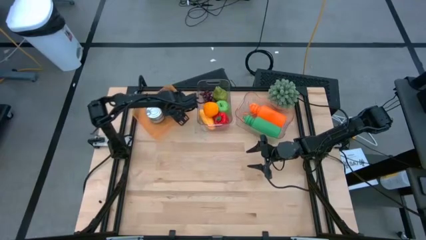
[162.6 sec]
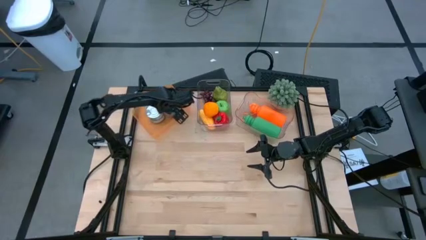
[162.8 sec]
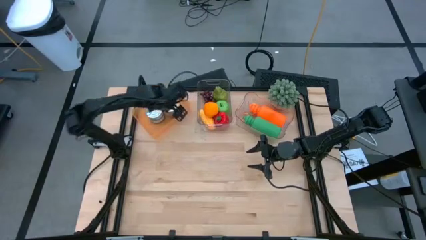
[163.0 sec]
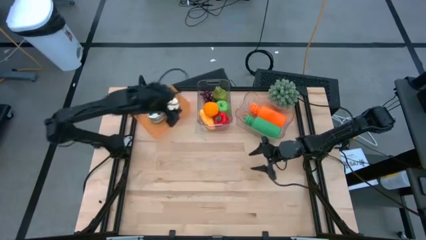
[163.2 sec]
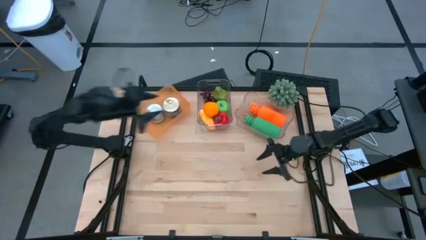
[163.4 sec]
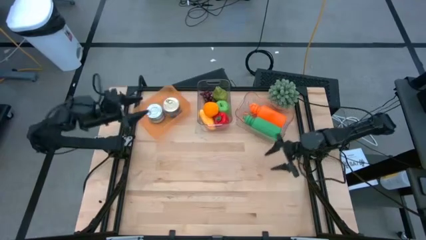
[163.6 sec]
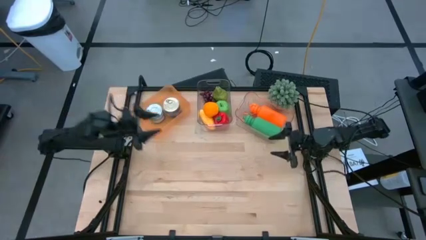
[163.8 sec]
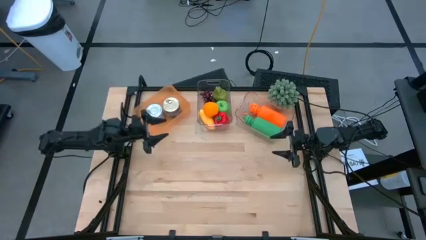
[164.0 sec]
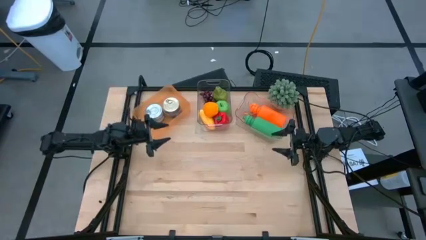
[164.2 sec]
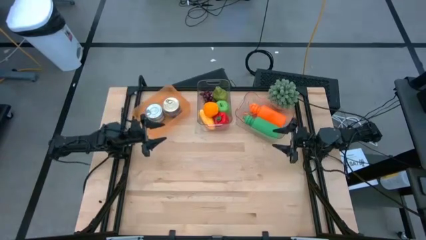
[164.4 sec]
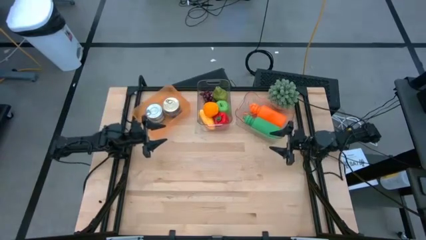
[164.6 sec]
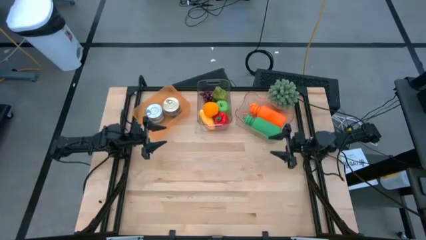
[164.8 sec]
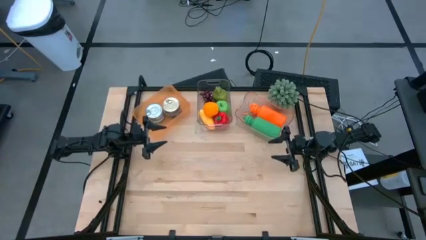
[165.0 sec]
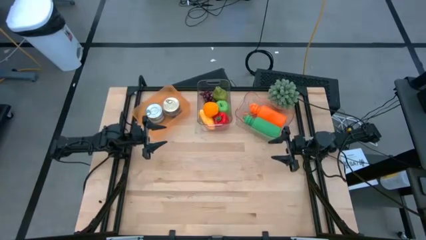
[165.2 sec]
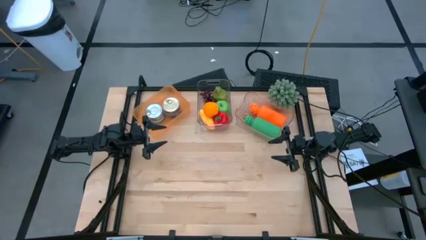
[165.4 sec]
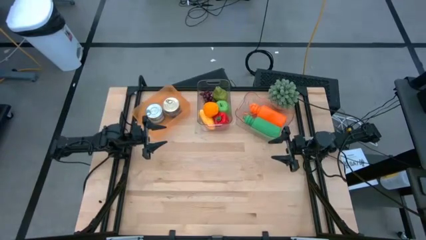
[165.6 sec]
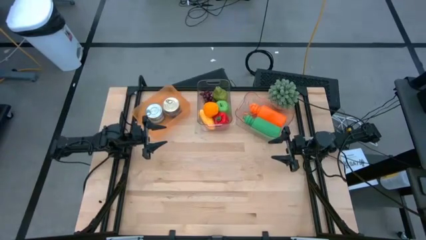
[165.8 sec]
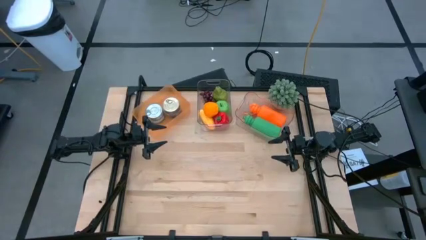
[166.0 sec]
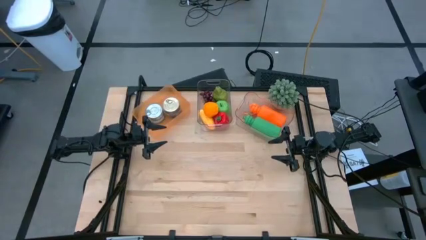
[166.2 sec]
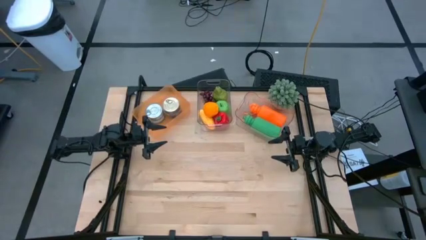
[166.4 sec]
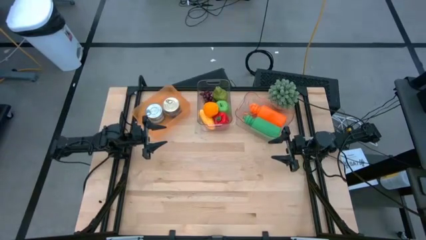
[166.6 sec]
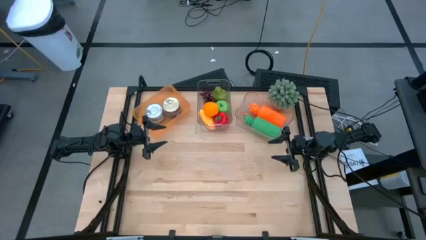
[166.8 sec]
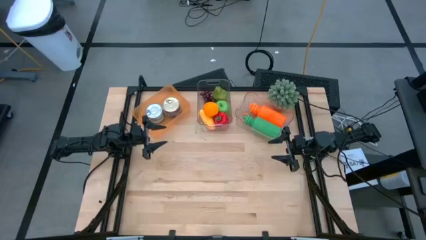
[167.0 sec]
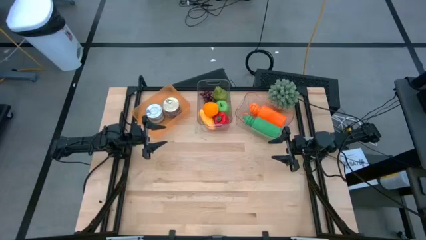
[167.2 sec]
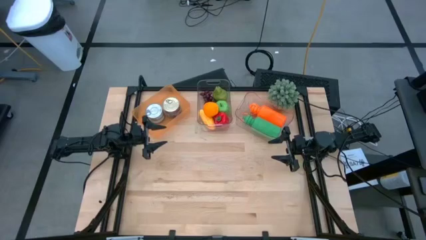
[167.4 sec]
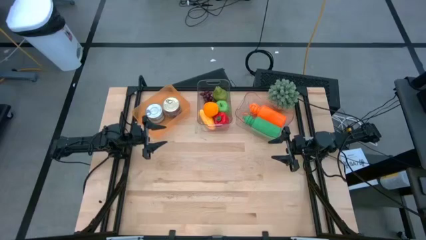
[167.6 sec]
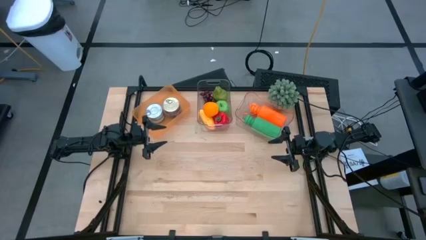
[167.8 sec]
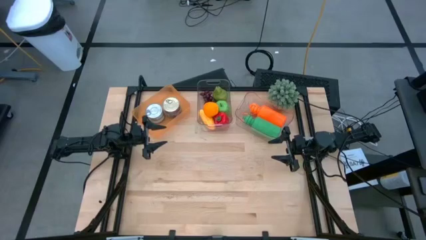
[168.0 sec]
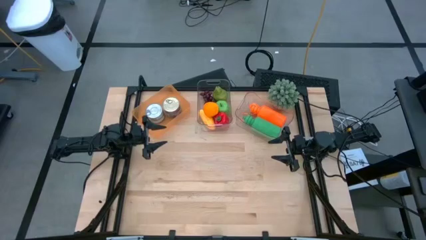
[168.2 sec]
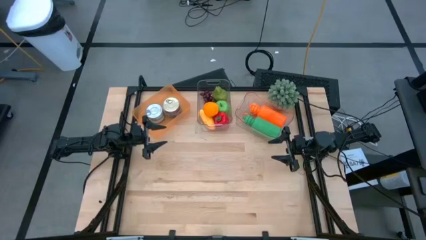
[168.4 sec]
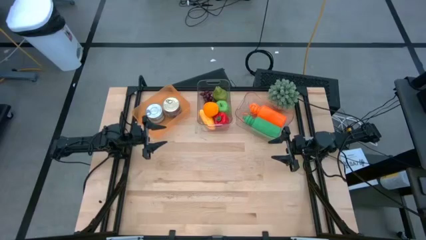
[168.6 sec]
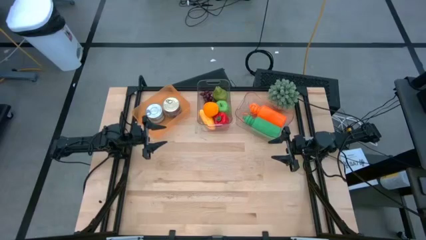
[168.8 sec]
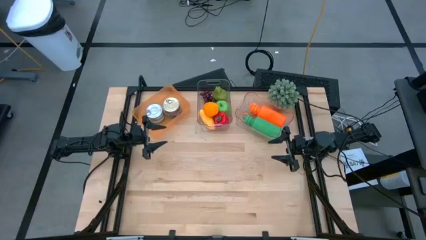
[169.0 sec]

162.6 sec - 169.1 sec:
Task: Pick & Place Food Item
Return to Home Position
